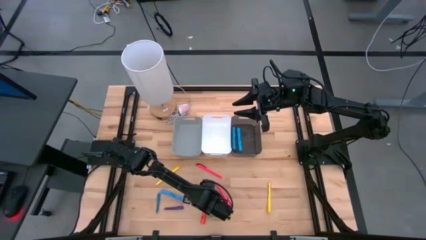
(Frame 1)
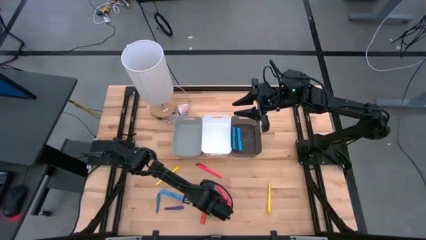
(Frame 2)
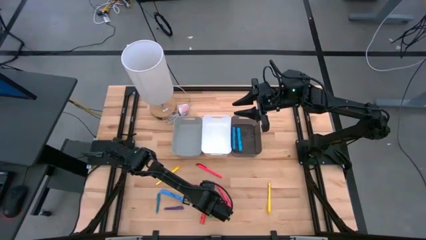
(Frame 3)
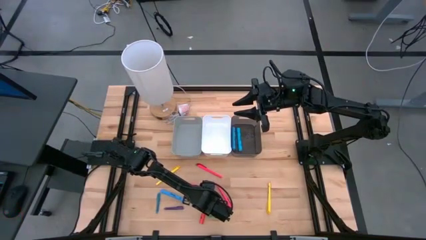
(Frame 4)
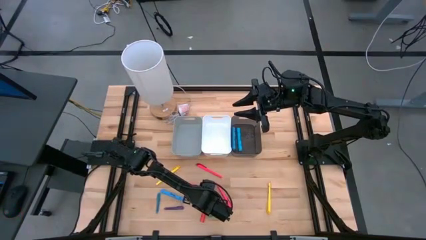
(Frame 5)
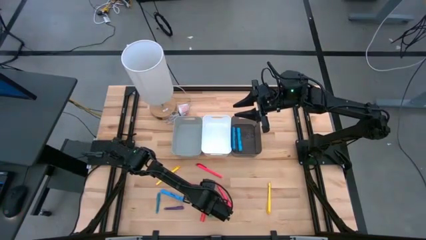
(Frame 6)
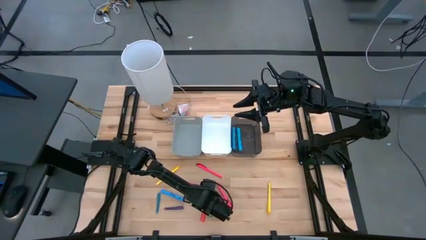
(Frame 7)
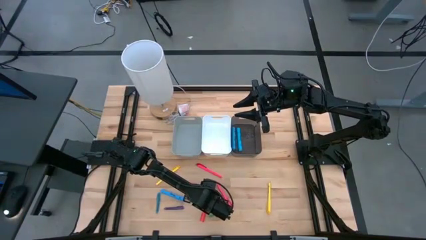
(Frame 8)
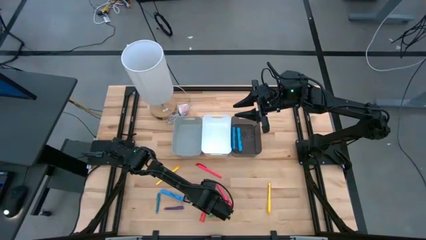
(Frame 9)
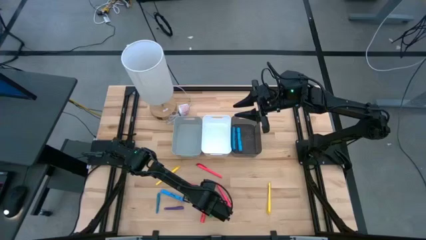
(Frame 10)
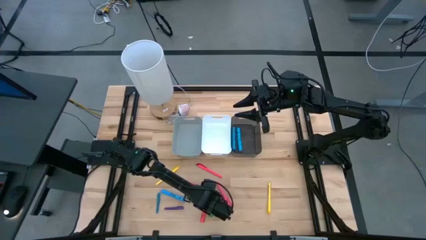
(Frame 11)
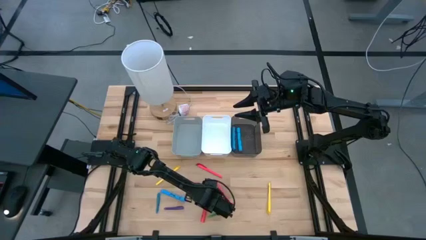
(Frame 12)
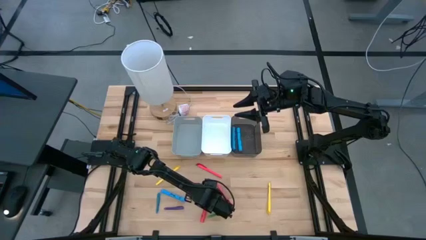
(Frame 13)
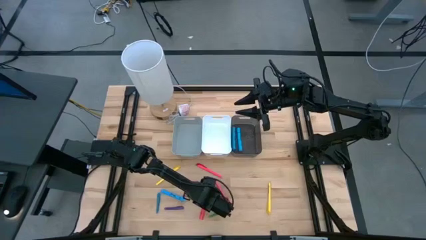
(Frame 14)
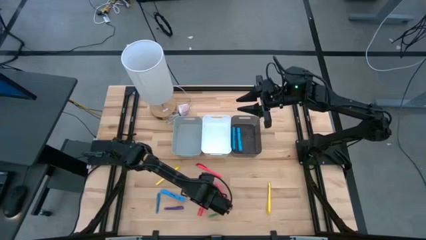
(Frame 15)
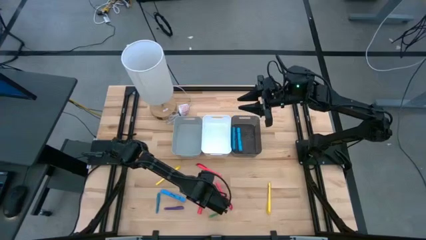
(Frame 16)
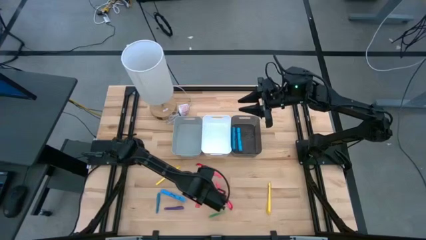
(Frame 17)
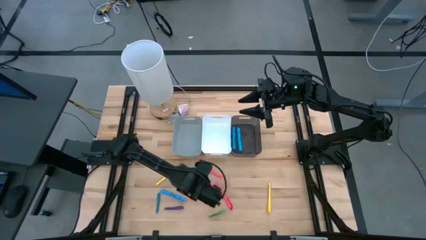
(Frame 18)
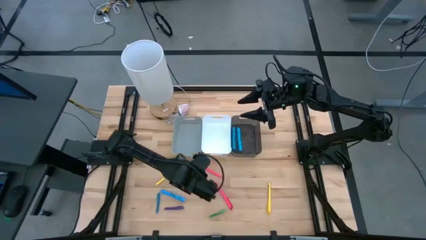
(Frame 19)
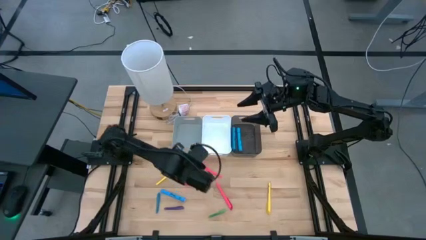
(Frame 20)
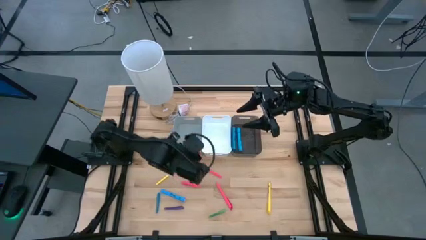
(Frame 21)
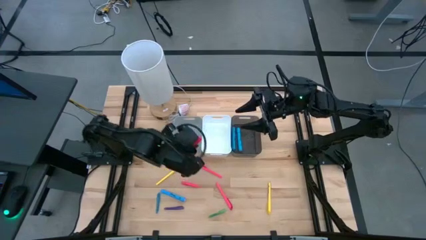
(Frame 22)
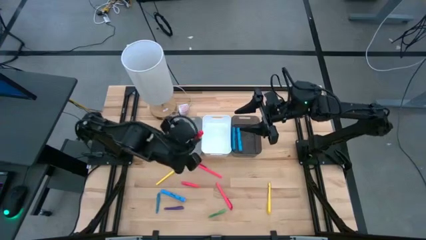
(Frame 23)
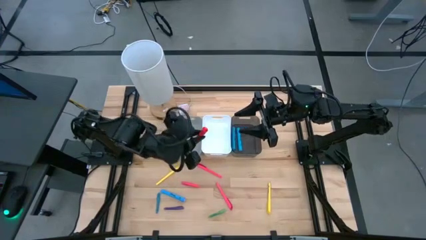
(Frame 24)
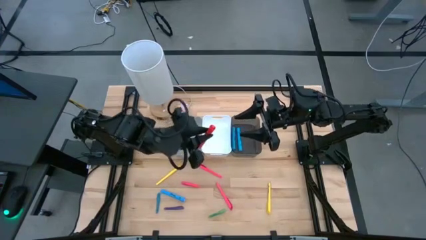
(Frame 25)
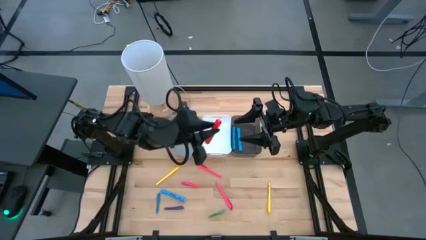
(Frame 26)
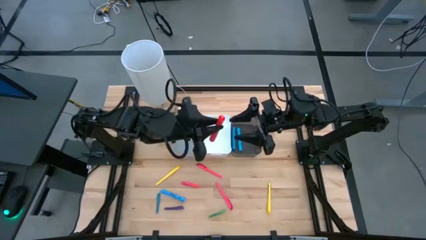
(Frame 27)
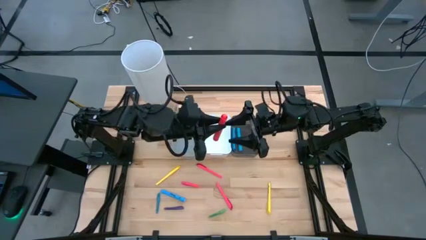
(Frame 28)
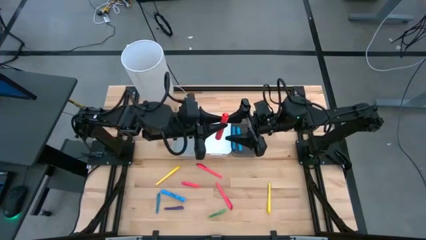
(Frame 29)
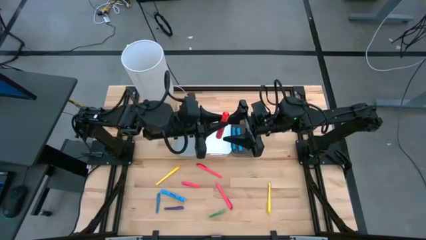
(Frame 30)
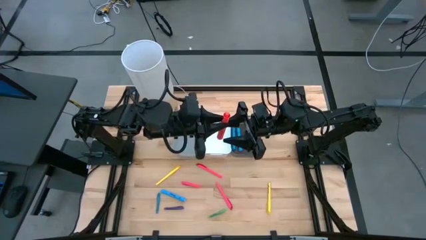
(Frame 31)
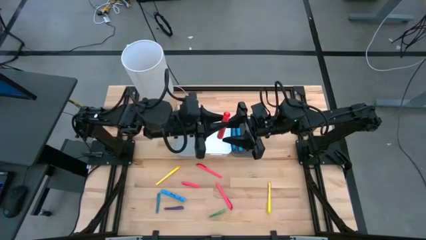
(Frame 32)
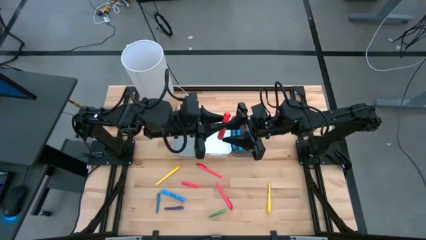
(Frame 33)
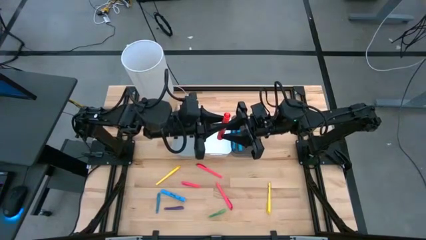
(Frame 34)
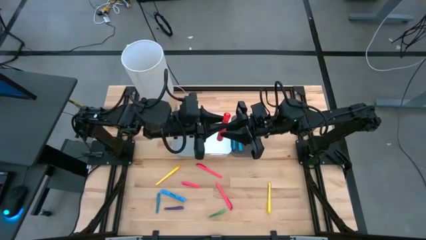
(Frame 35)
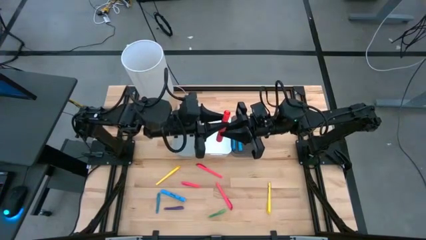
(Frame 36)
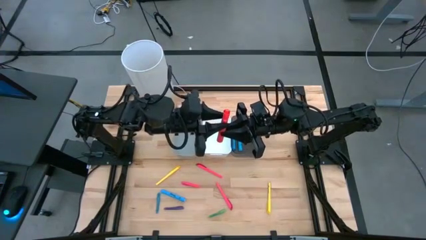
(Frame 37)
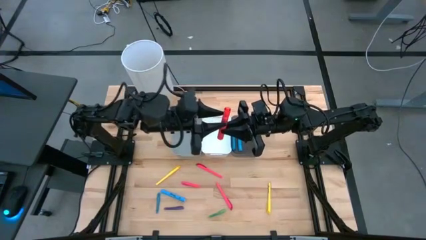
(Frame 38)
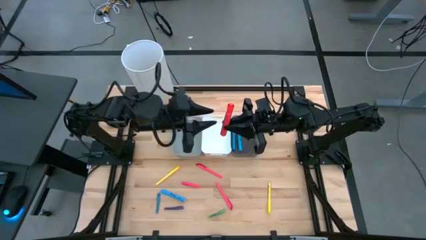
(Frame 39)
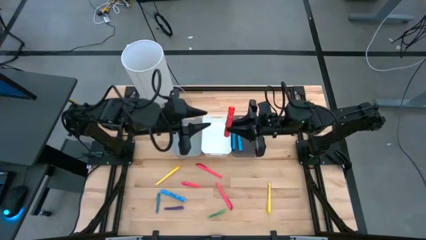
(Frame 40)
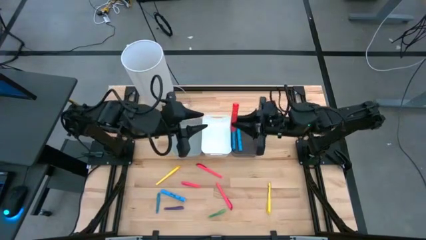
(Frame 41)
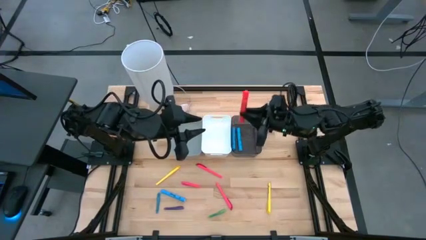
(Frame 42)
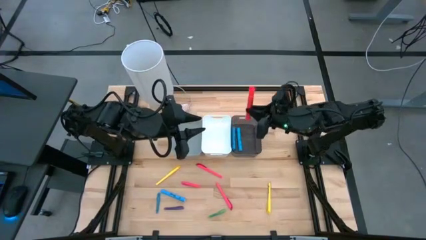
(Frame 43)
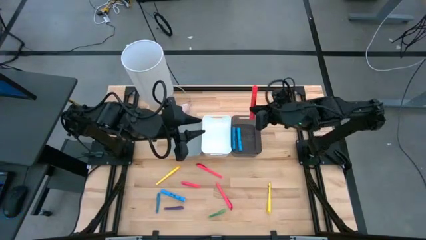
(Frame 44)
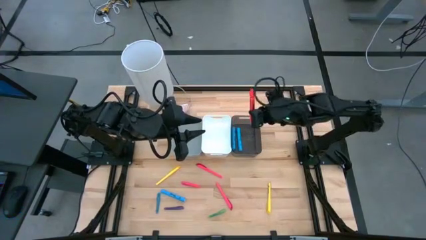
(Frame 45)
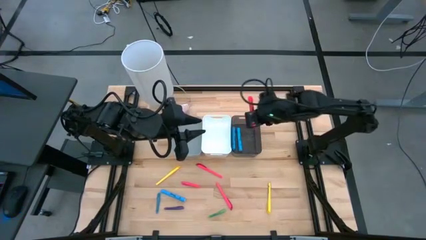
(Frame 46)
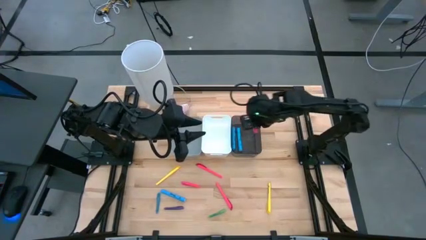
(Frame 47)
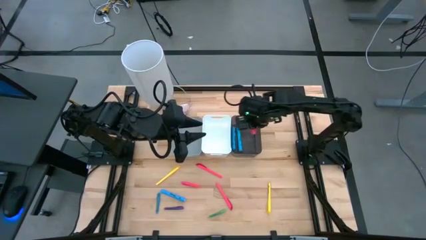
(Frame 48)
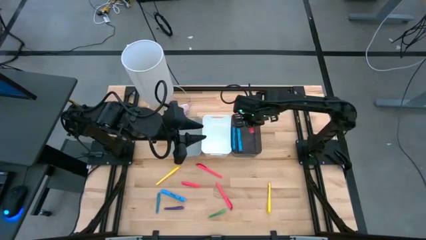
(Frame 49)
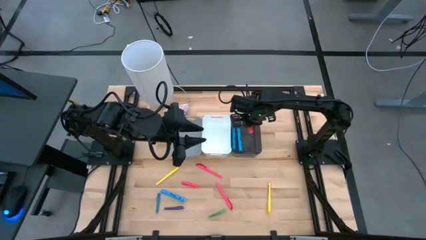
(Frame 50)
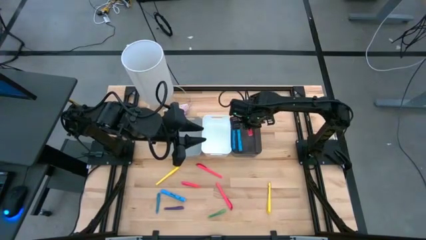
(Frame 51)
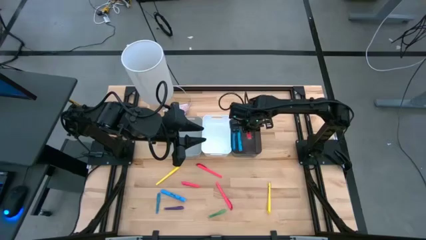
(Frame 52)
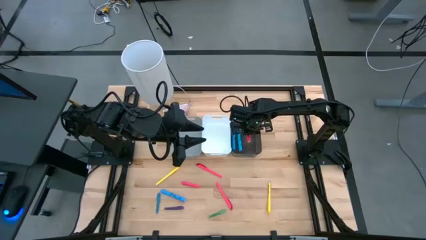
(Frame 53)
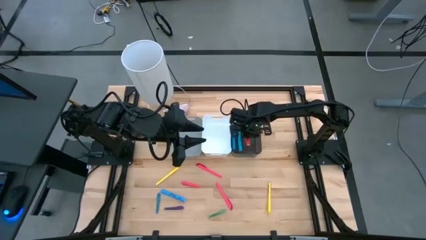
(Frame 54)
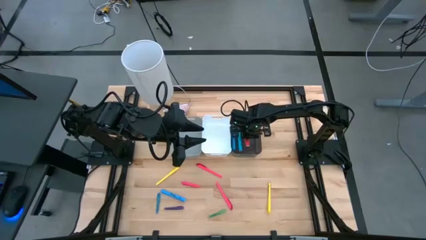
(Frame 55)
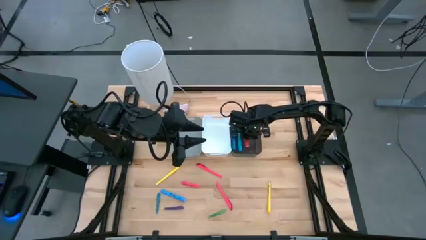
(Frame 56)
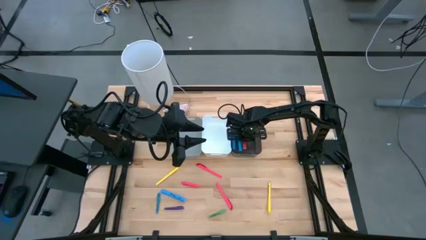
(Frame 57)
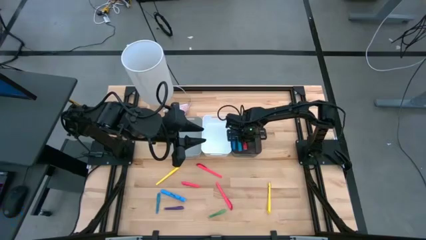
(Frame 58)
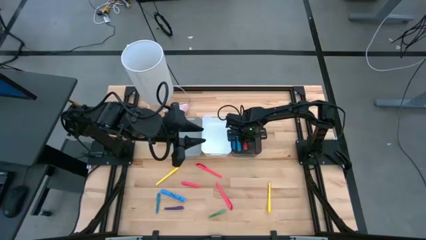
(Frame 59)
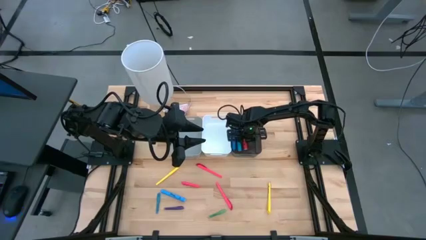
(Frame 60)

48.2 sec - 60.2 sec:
Task: Pick & Place Markers
Put the orange marker pen into the black bin

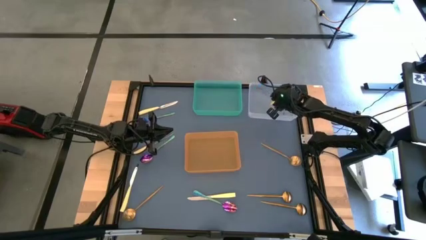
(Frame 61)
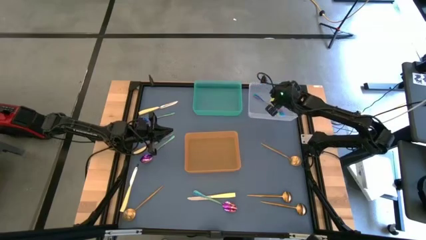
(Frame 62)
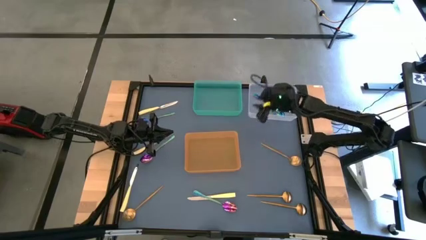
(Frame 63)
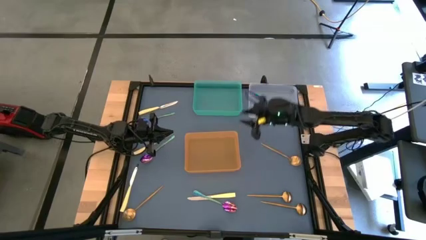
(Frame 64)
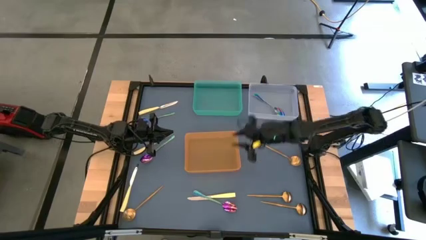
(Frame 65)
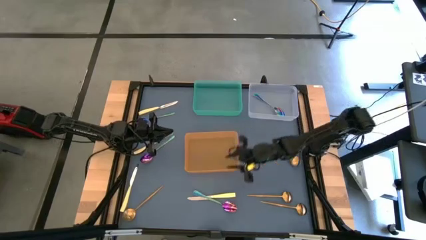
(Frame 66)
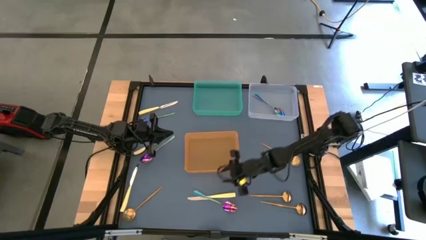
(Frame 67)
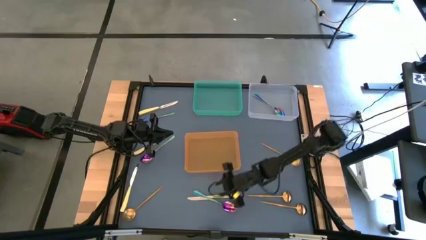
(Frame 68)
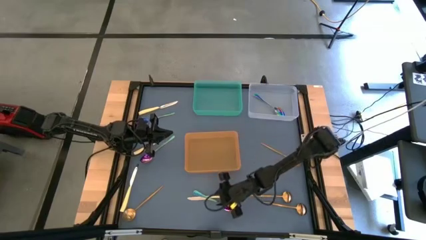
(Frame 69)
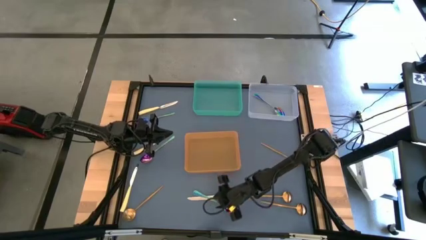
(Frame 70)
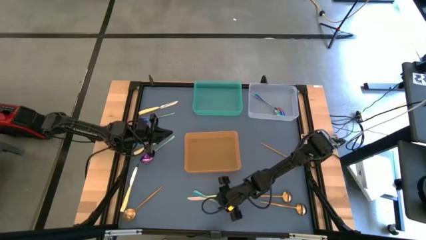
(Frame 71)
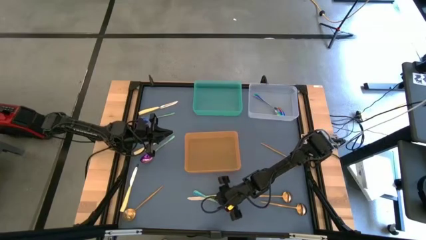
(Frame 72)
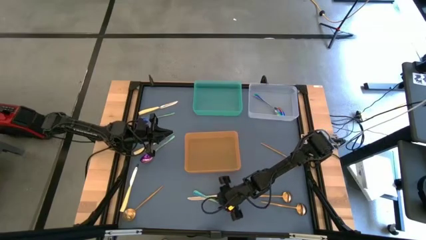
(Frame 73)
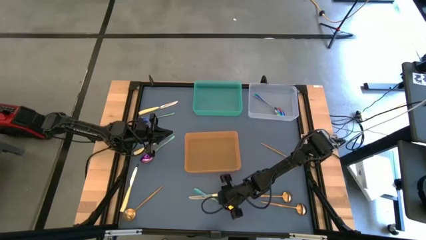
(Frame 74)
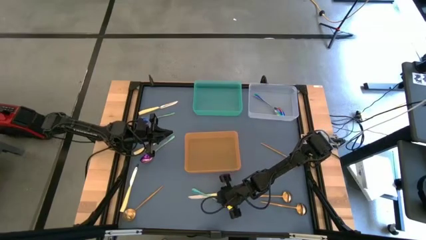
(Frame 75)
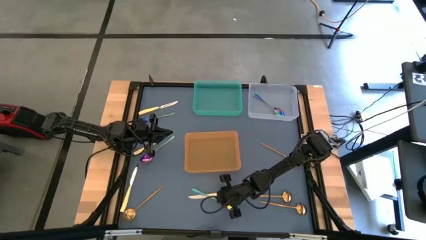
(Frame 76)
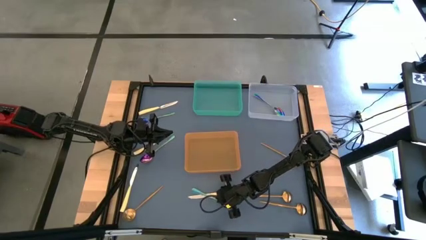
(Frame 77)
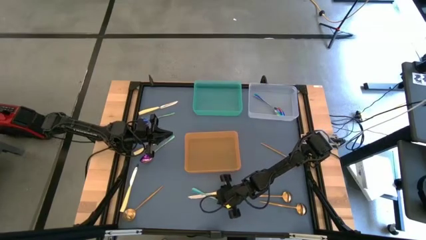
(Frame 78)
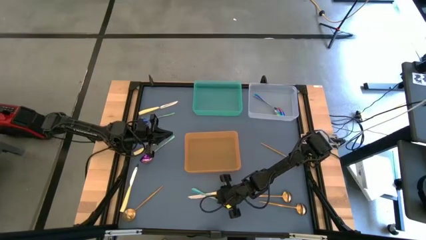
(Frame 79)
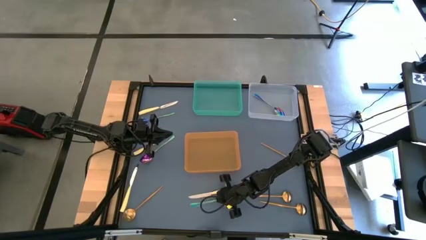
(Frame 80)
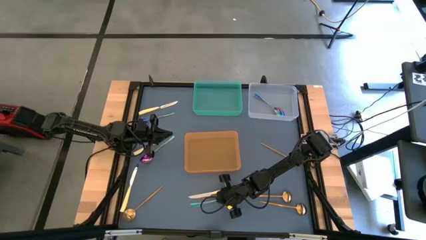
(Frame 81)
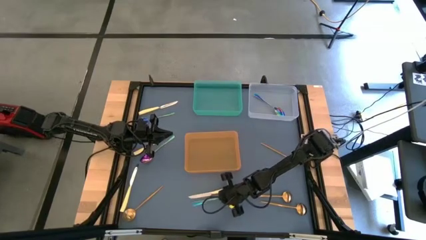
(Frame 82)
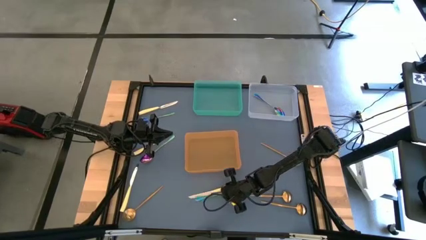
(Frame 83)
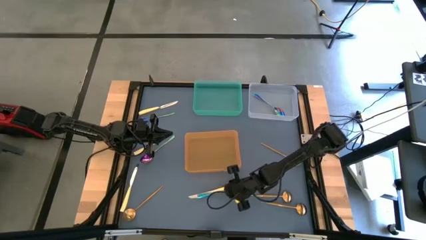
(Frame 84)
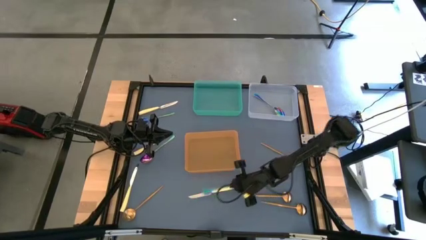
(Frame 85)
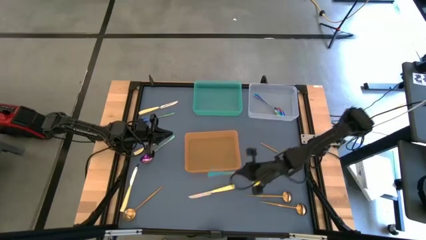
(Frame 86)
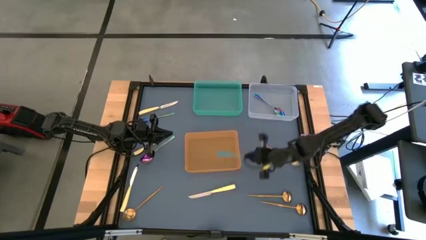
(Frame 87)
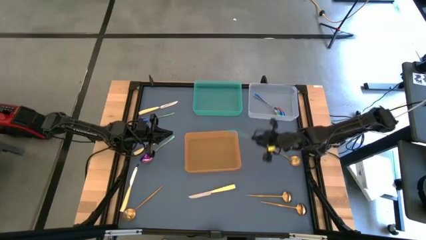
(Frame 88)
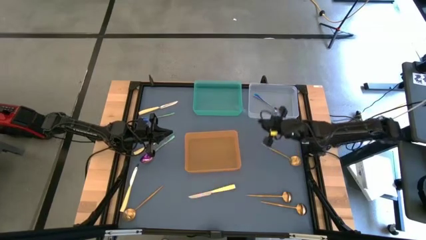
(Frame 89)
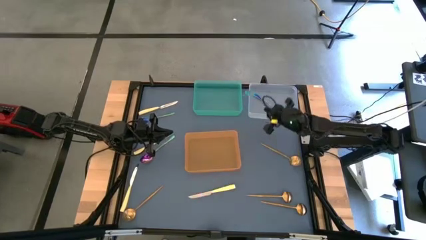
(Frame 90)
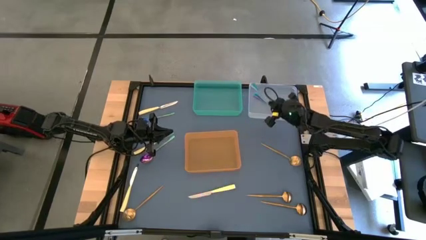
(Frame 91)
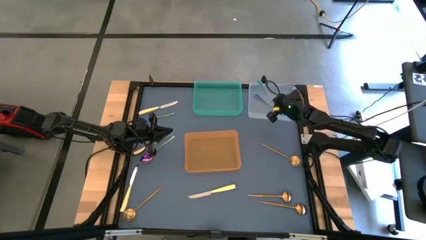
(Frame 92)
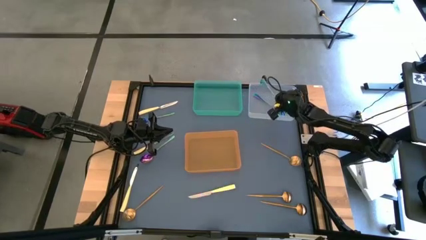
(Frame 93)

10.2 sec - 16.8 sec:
Task: Sort silverware by color (type)
Put the blue spoon into the transparent bin
